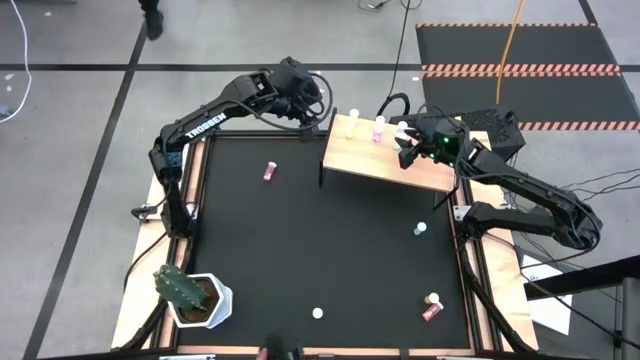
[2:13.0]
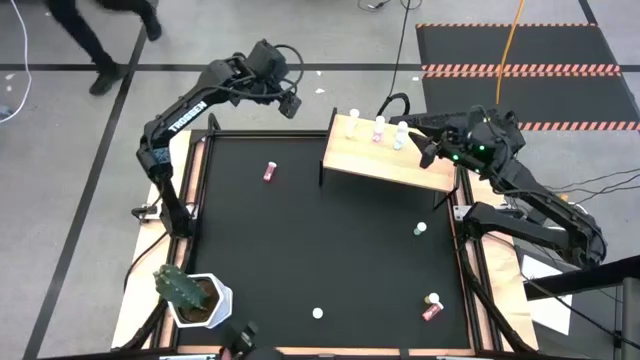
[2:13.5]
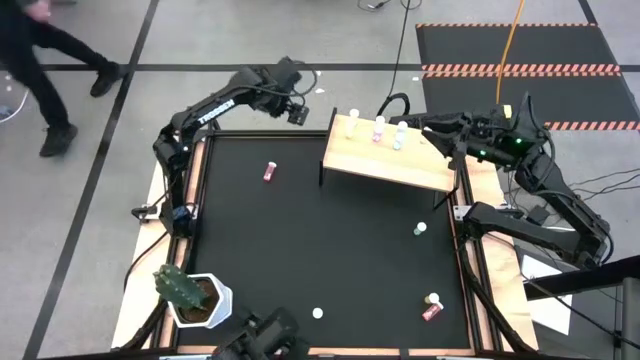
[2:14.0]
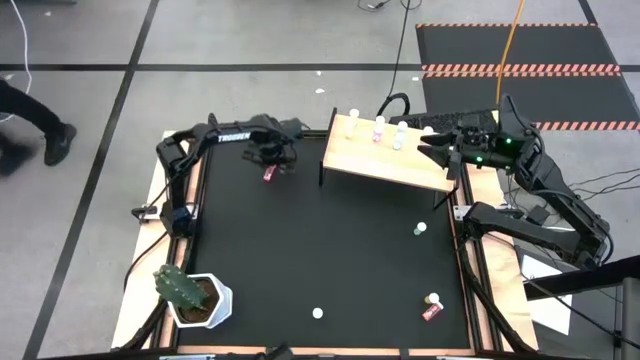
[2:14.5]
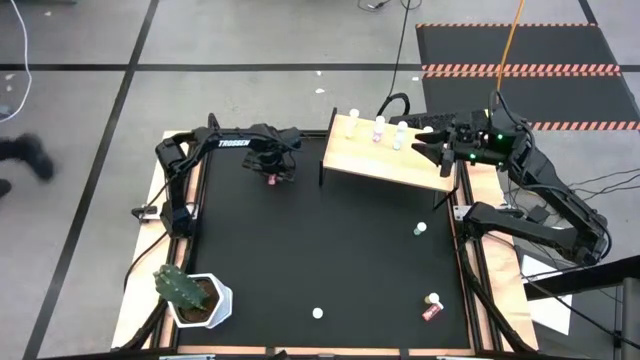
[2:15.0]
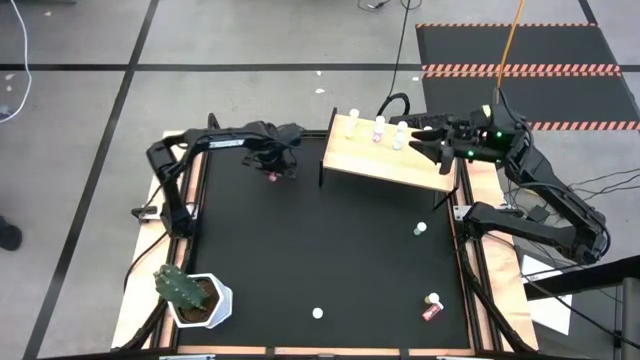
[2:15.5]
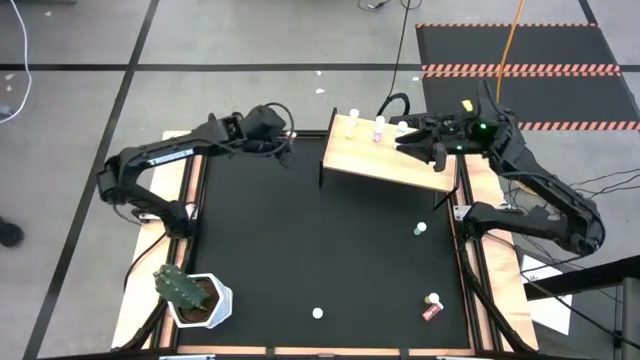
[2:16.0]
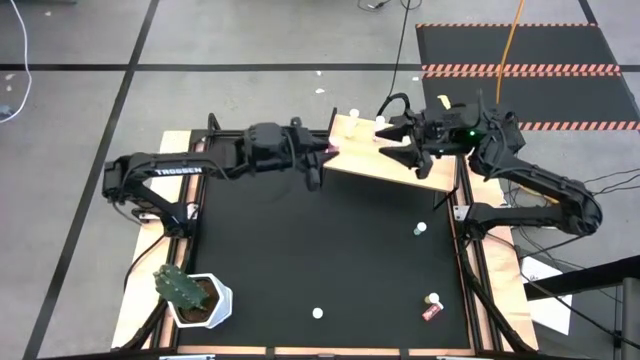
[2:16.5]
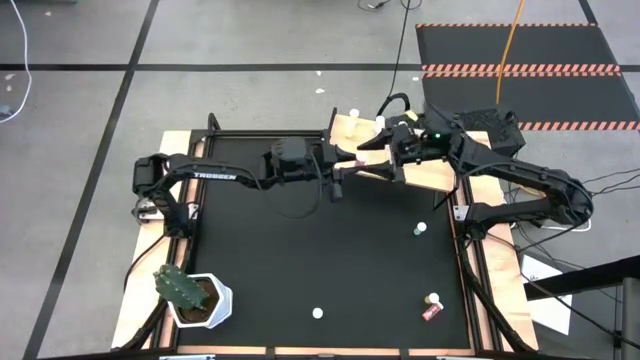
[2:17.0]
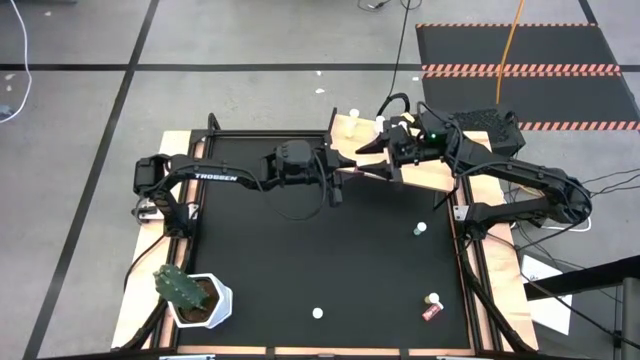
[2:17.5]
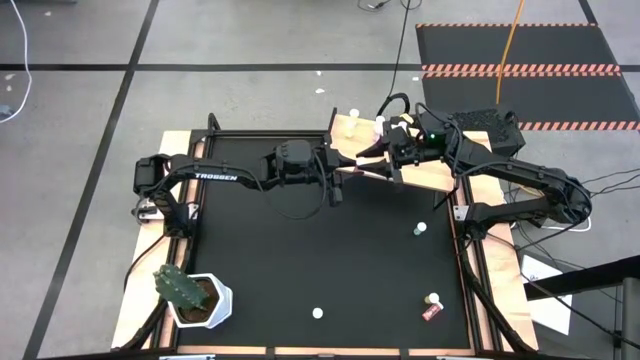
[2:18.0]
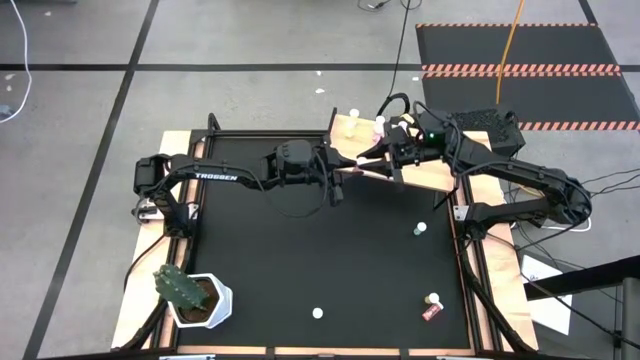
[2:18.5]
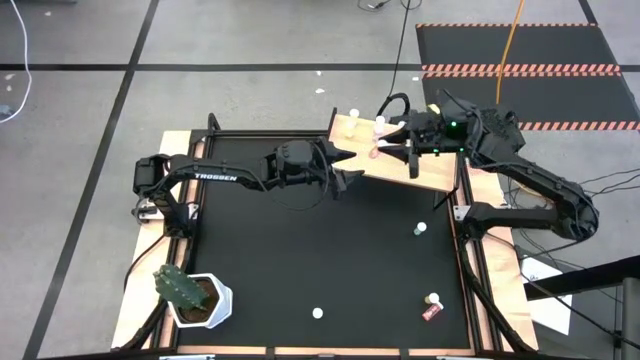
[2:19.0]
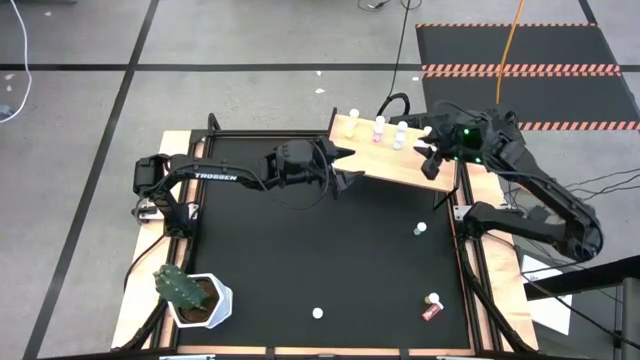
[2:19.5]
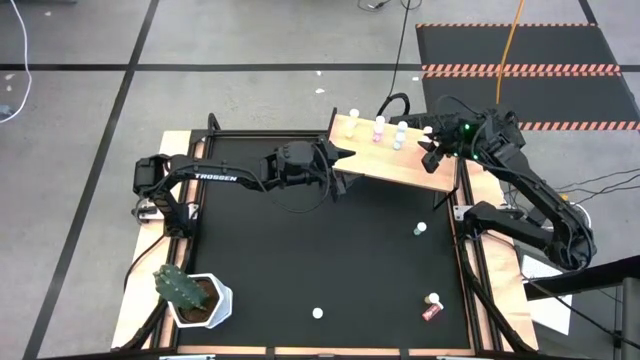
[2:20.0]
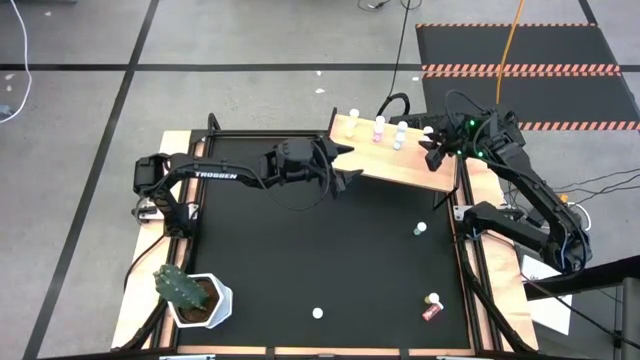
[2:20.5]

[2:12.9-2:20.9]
Task: Pick and place medicine bottles onto shelf by color
Put the top orange pill bottle on the shelf aligned with the other orange pill bottle

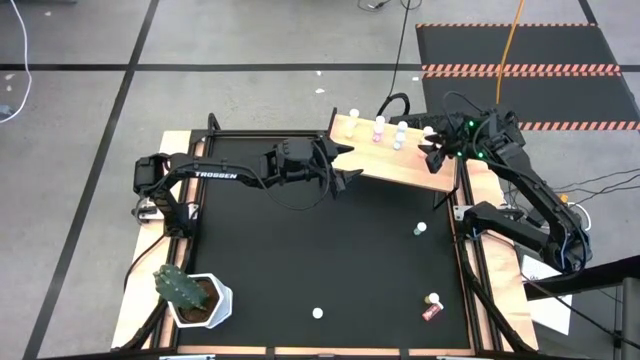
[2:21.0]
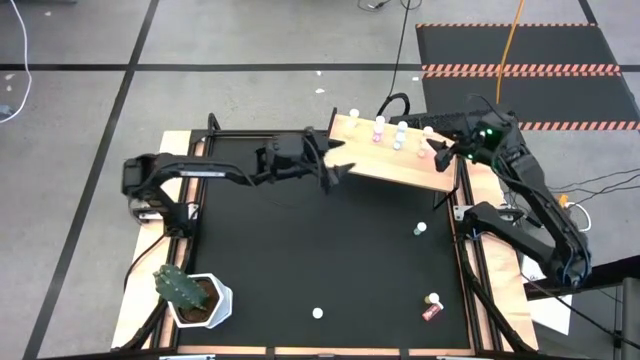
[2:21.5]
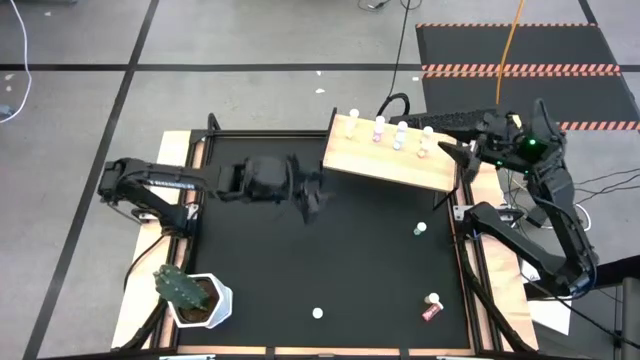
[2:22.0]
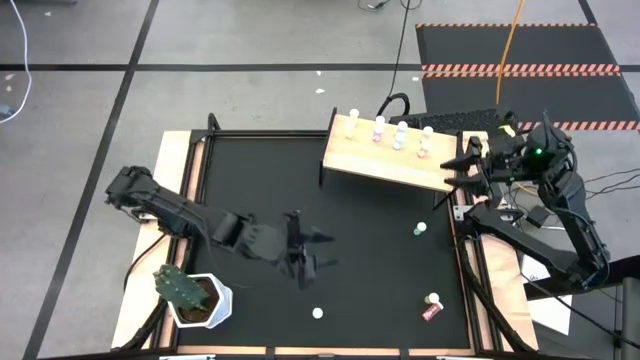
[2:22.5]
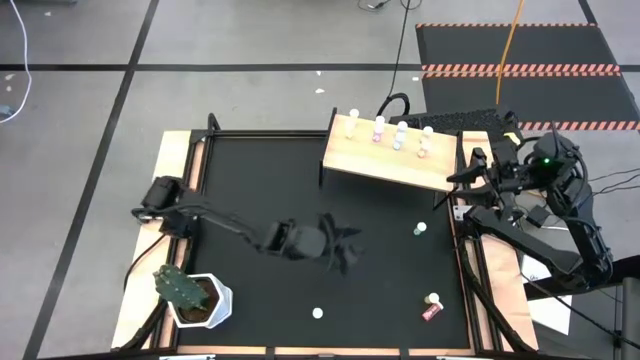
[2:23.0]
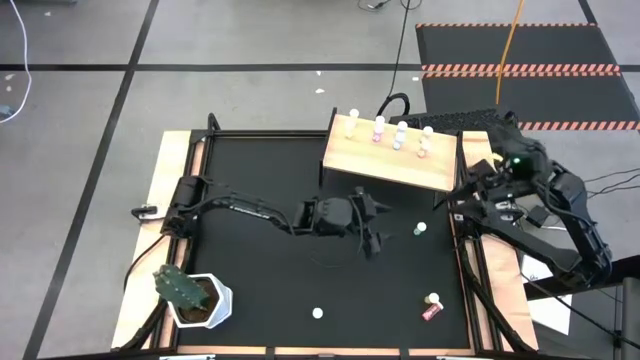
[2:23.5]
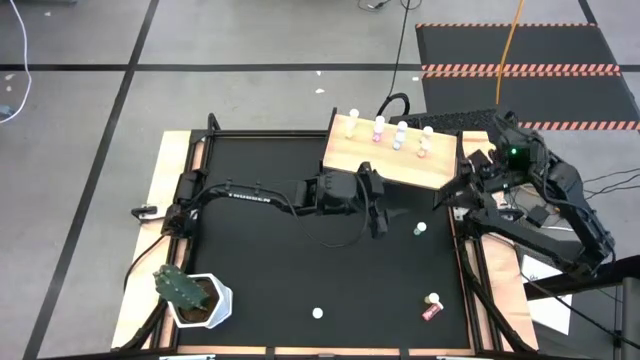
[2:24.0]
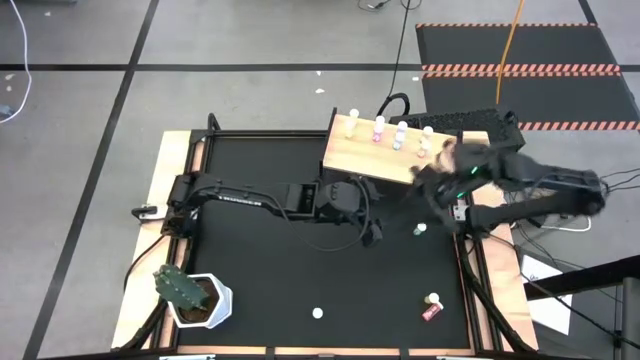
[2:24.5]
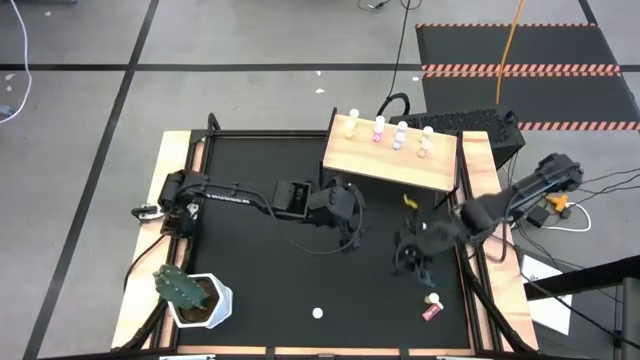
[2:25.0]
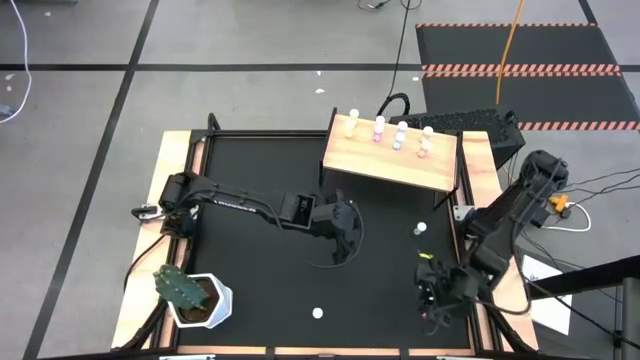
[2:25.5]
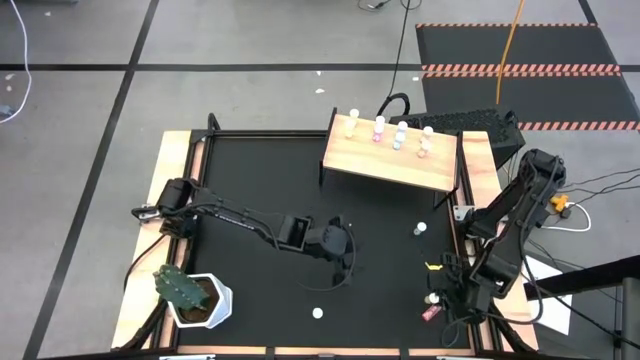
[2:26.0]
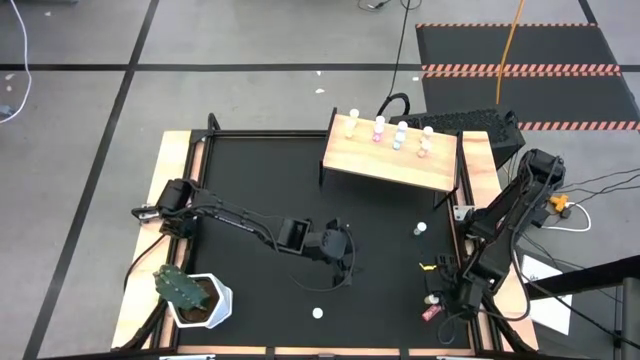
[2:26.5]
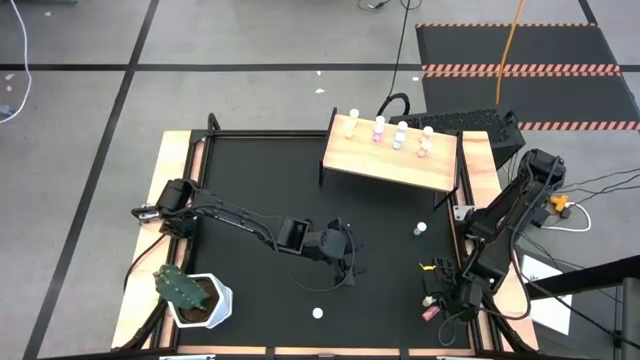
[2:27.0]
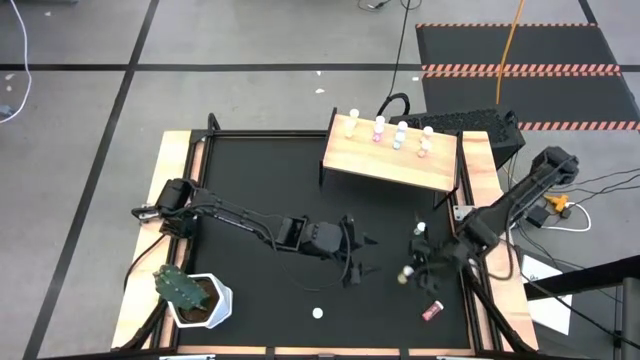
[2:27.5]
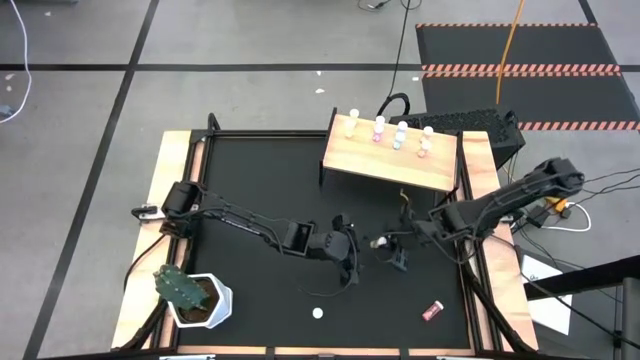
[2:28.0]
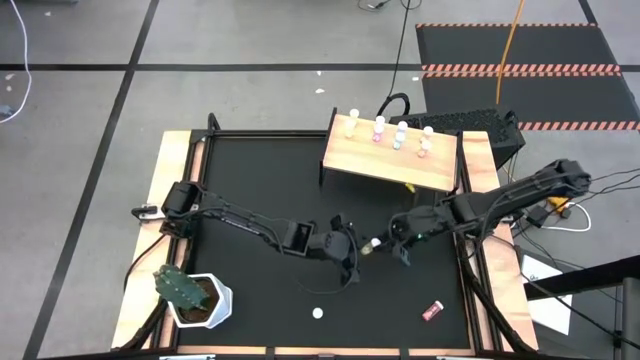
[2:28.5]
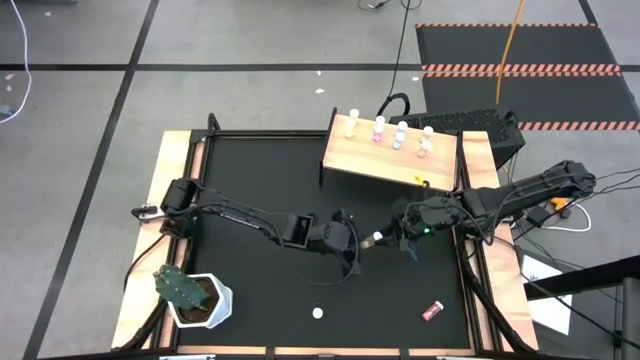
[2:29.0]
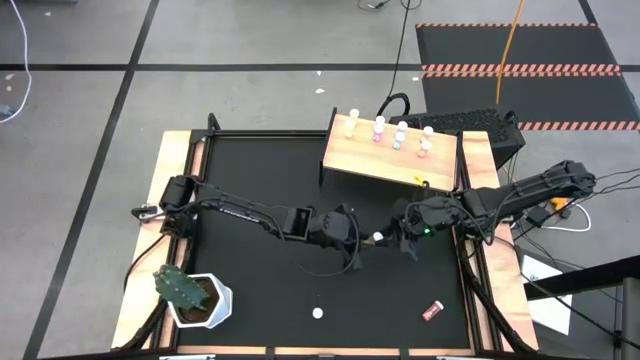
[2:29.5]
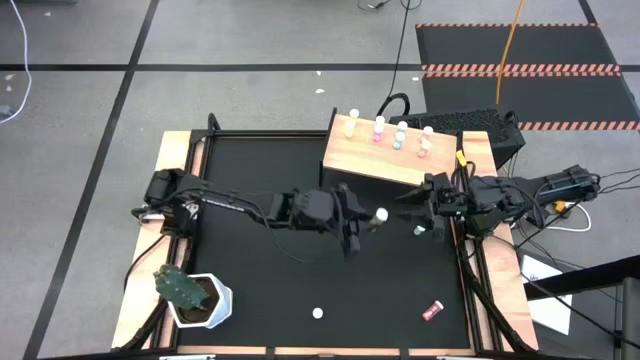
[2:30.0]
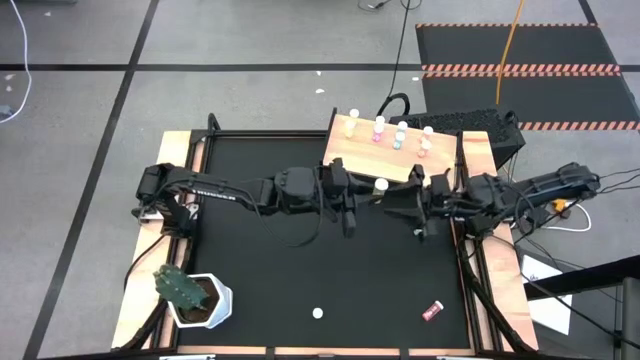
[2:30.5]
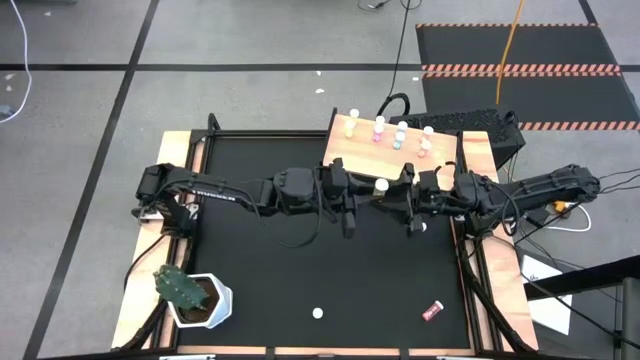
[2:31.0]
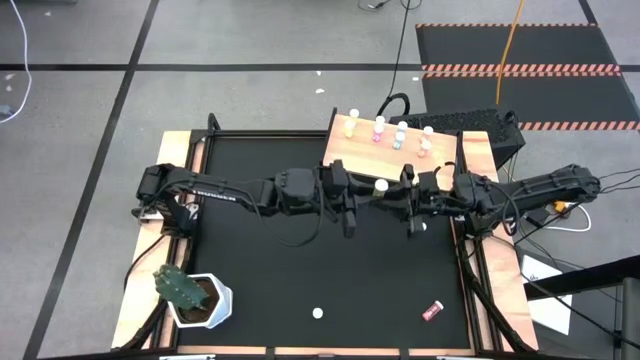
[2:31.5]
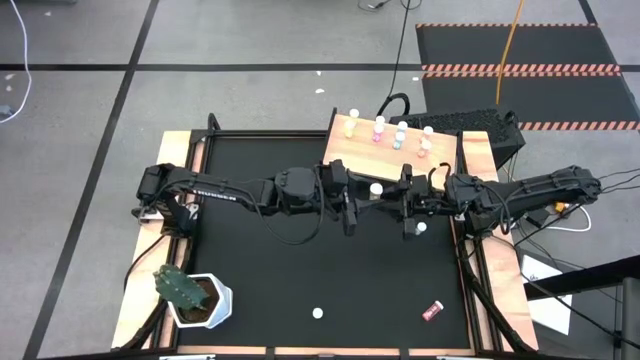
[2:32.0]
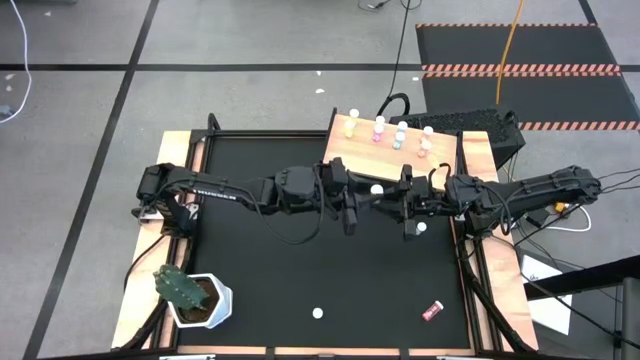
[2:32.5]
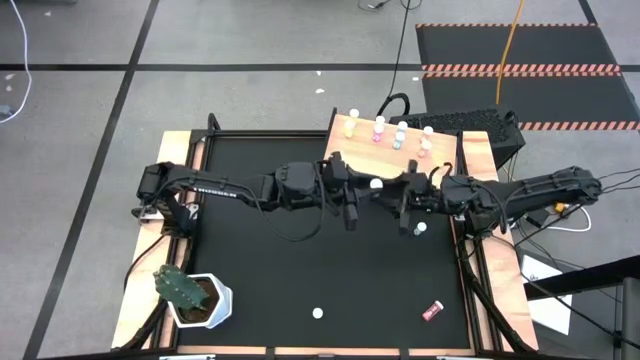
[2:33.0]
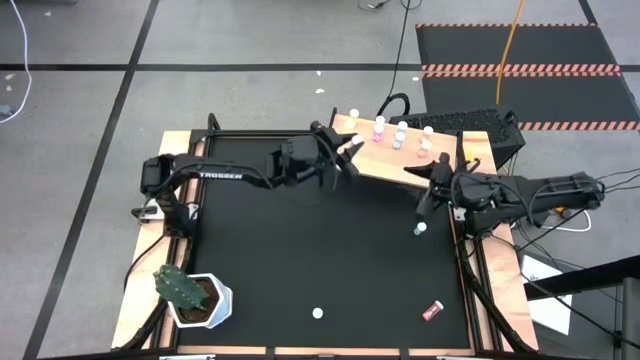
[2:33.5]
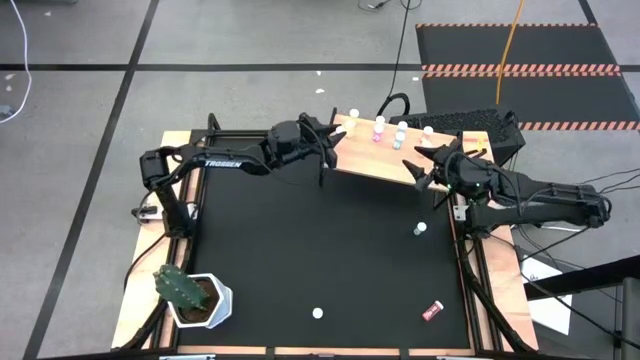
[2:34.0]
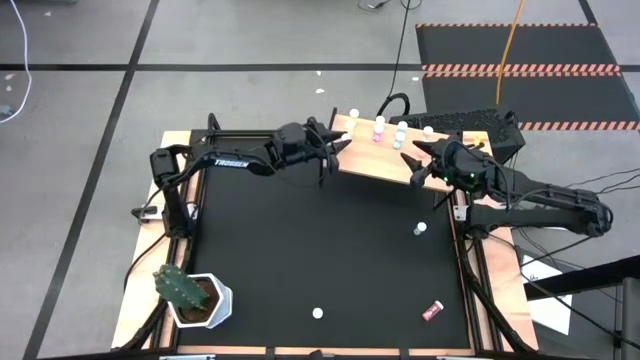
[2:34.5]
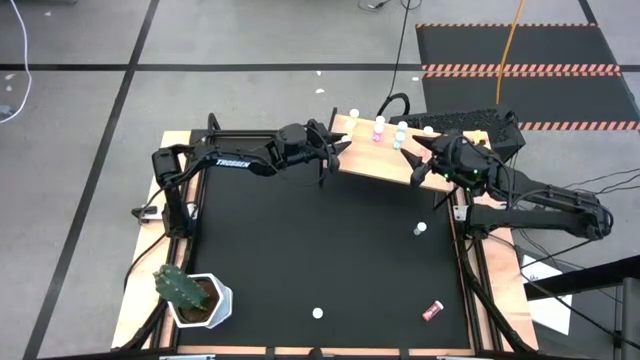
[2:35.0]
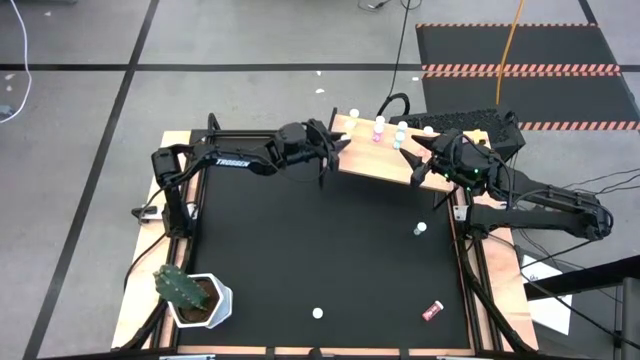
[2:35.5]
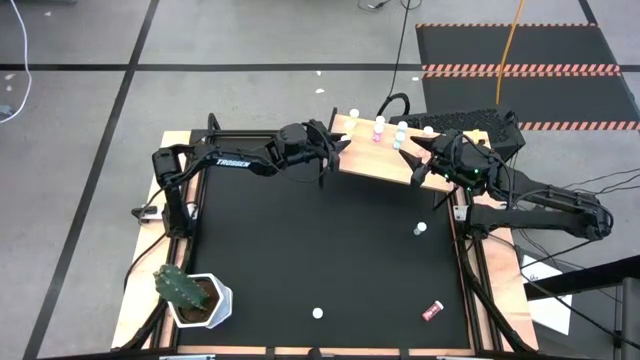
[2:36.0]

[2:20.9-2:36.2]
Put the yellow pill bottle on the shelf aligned with the other yellow pill bottles
